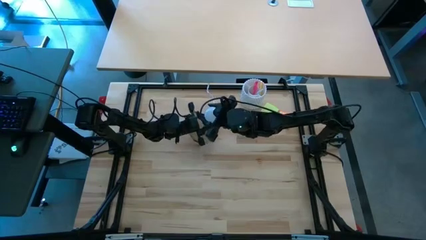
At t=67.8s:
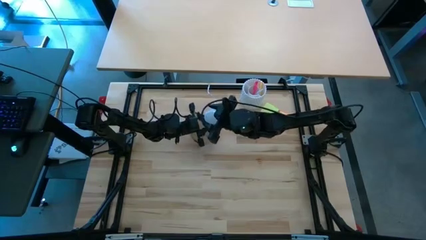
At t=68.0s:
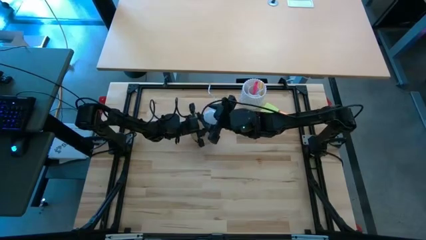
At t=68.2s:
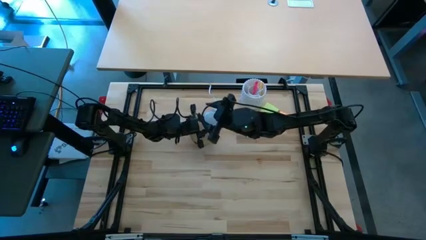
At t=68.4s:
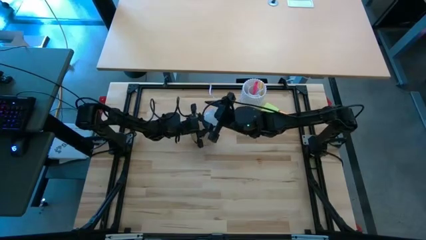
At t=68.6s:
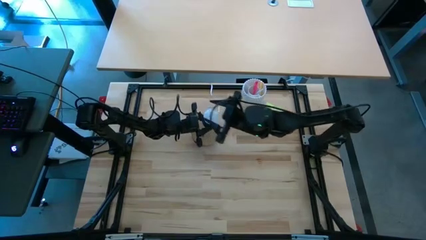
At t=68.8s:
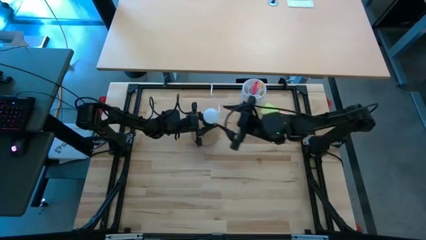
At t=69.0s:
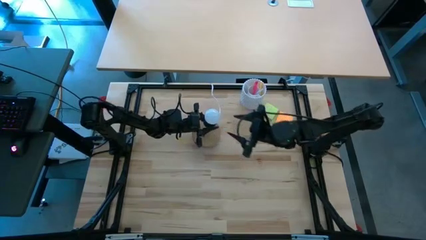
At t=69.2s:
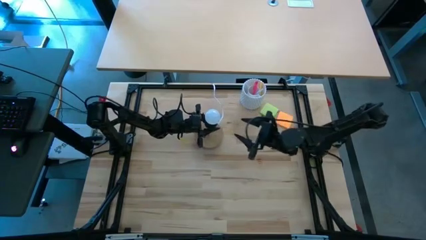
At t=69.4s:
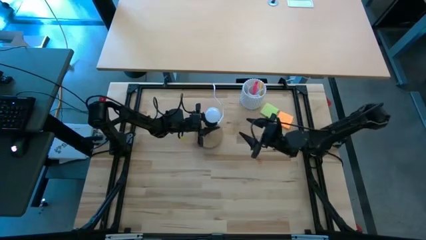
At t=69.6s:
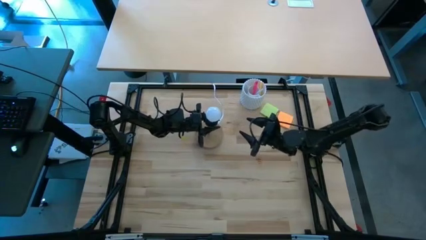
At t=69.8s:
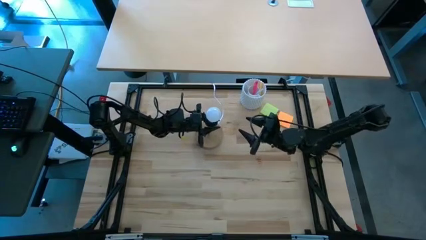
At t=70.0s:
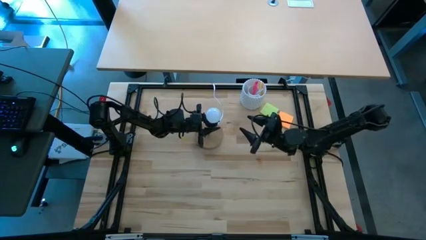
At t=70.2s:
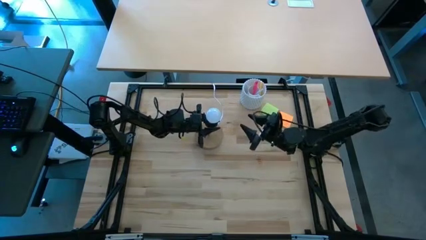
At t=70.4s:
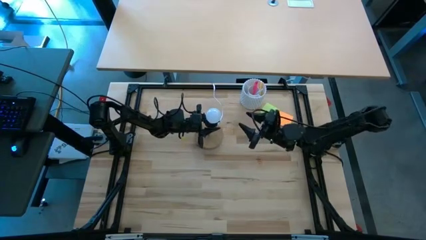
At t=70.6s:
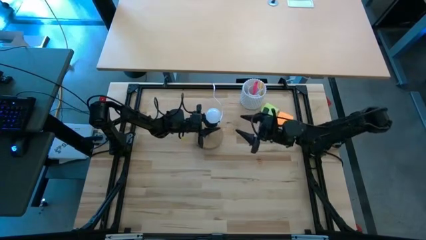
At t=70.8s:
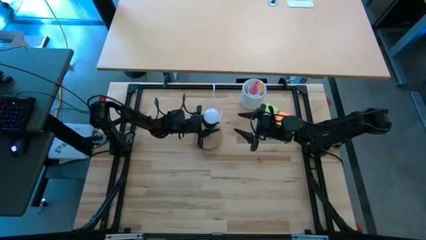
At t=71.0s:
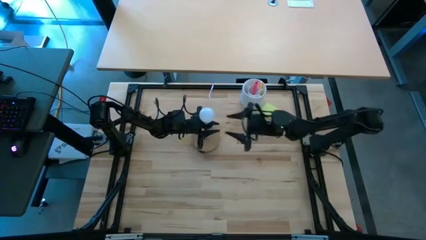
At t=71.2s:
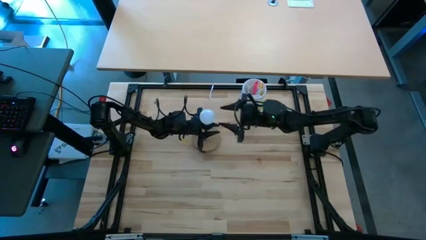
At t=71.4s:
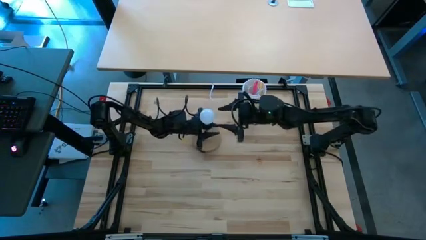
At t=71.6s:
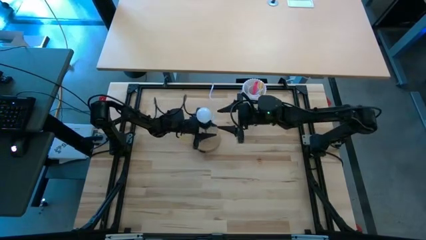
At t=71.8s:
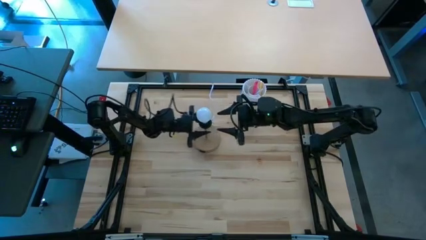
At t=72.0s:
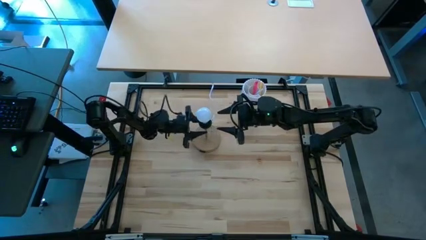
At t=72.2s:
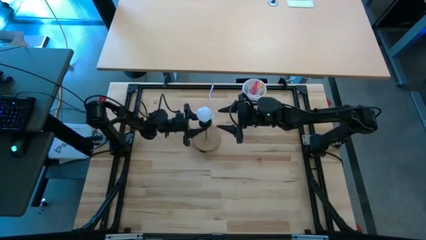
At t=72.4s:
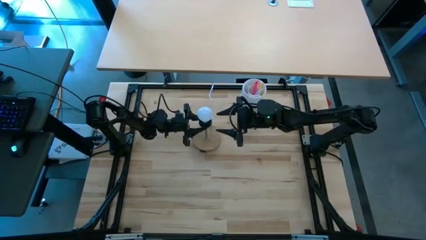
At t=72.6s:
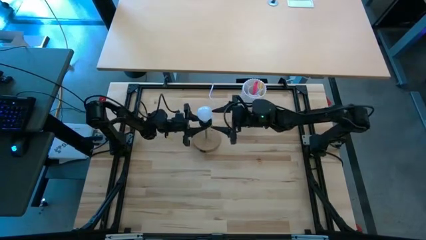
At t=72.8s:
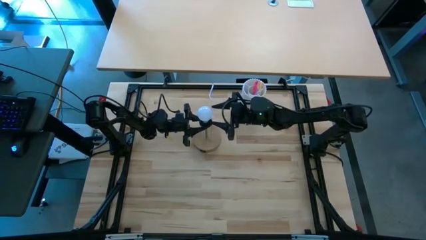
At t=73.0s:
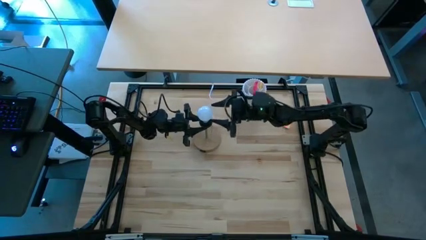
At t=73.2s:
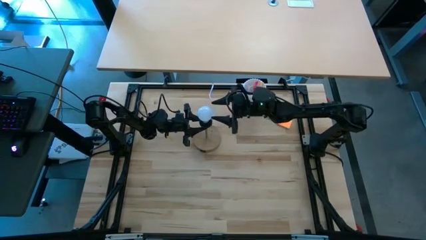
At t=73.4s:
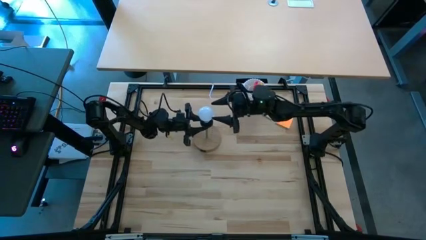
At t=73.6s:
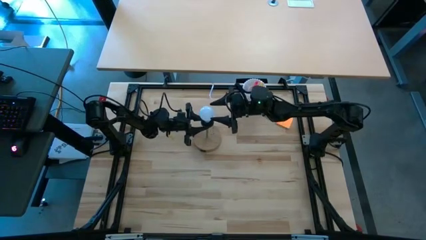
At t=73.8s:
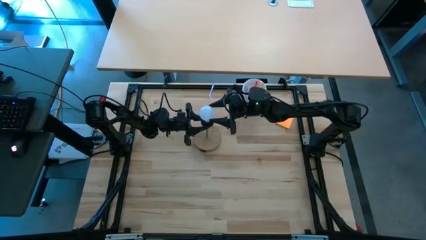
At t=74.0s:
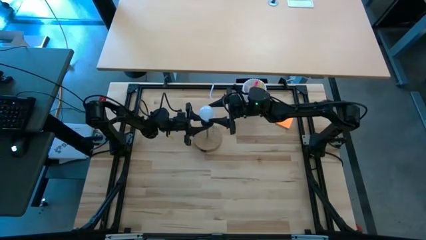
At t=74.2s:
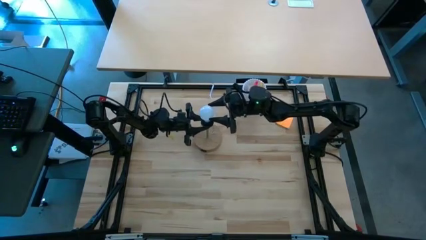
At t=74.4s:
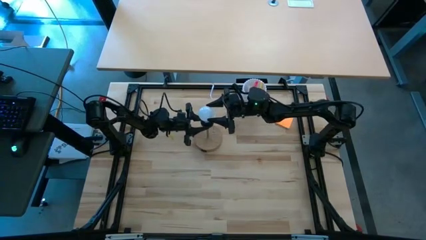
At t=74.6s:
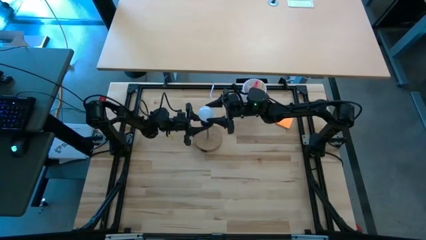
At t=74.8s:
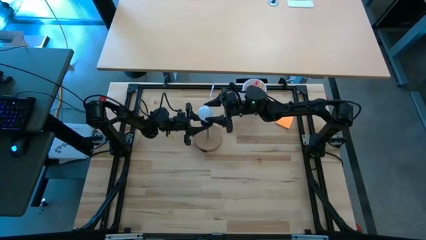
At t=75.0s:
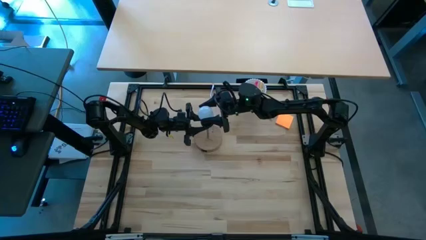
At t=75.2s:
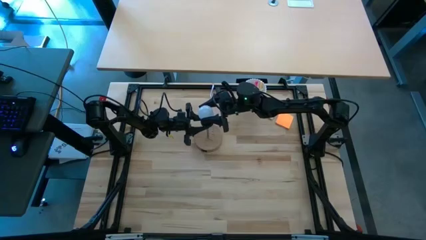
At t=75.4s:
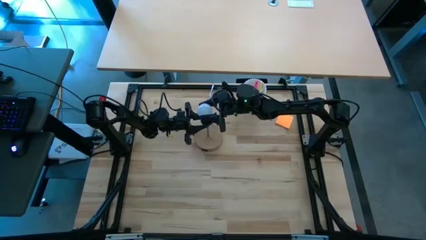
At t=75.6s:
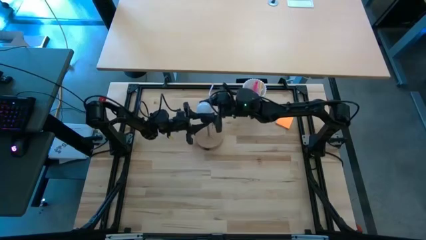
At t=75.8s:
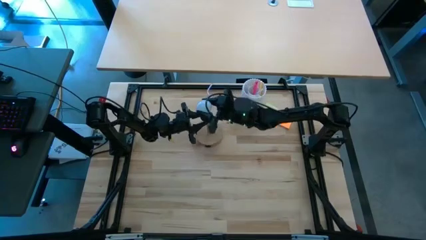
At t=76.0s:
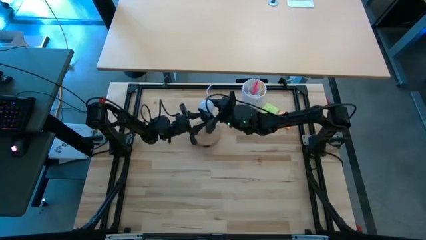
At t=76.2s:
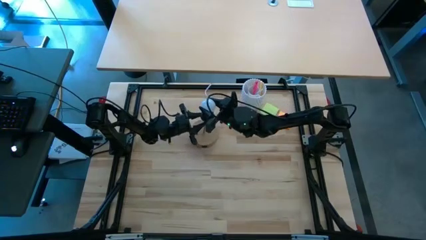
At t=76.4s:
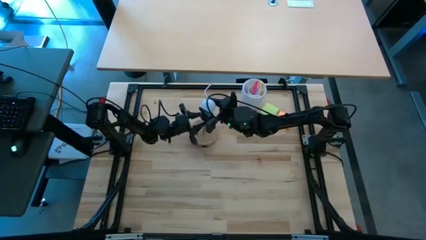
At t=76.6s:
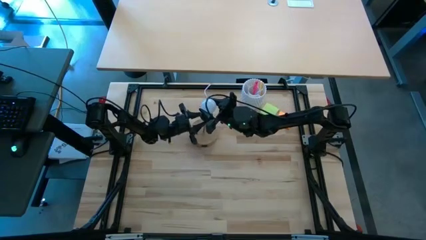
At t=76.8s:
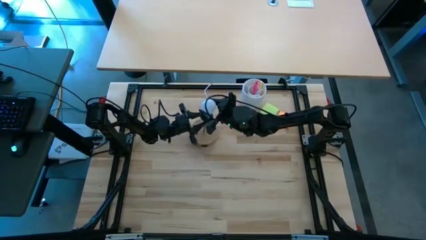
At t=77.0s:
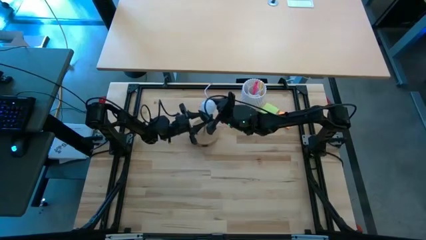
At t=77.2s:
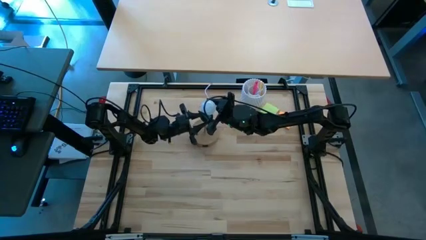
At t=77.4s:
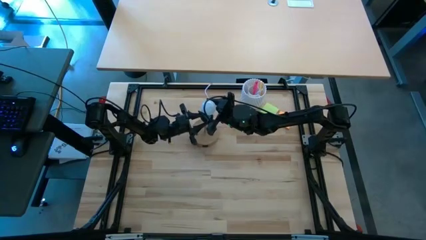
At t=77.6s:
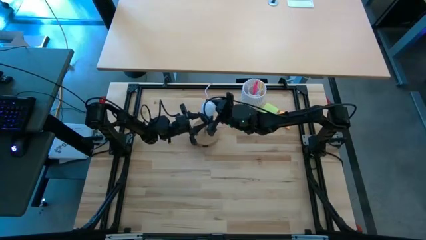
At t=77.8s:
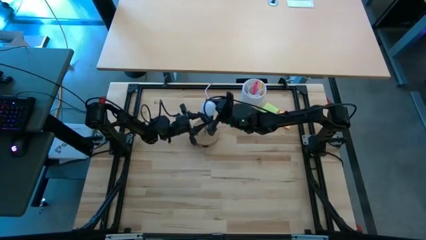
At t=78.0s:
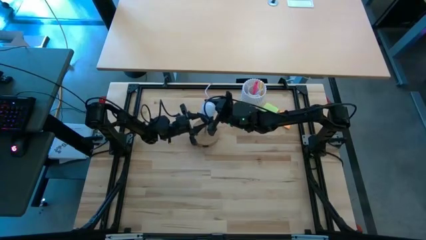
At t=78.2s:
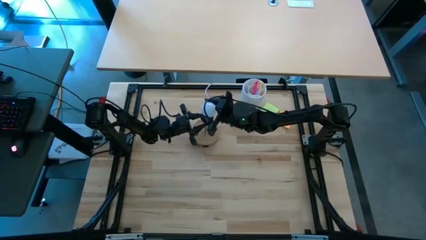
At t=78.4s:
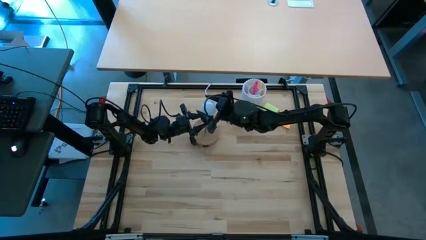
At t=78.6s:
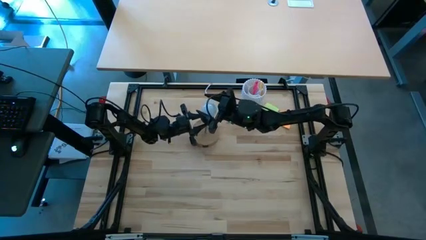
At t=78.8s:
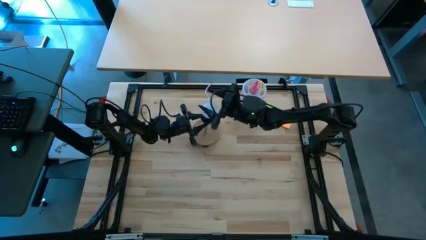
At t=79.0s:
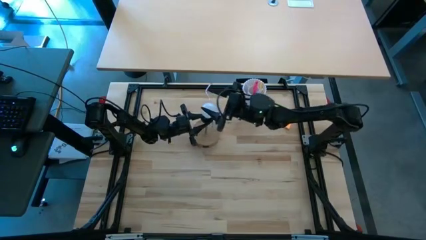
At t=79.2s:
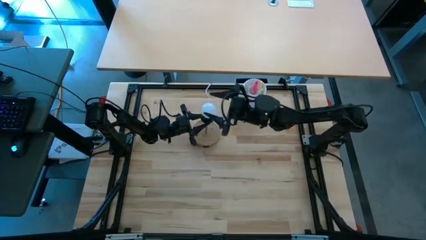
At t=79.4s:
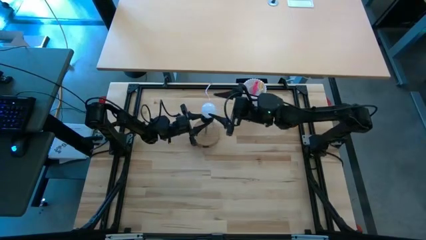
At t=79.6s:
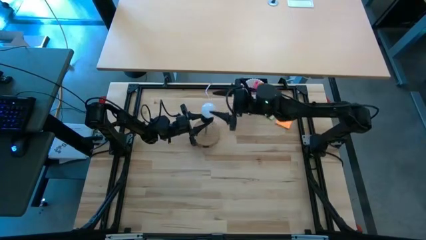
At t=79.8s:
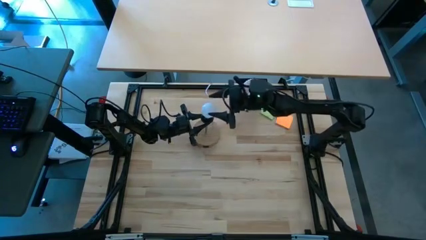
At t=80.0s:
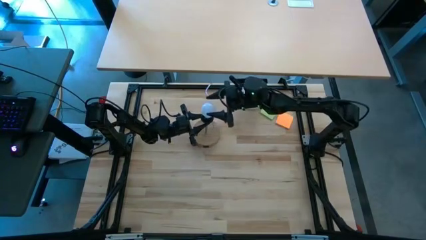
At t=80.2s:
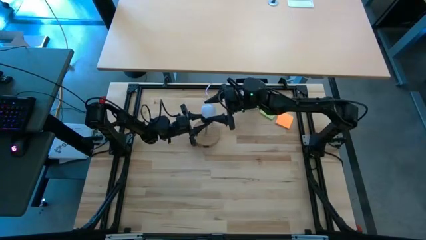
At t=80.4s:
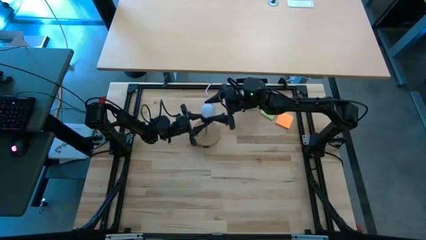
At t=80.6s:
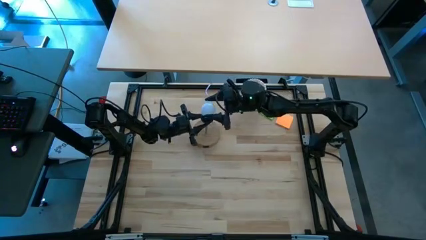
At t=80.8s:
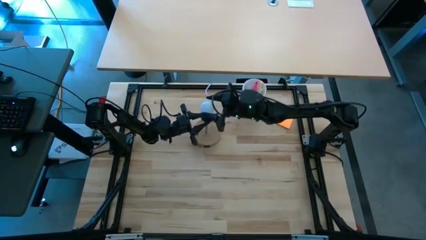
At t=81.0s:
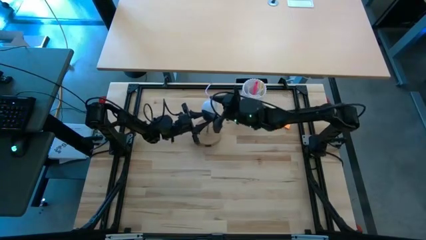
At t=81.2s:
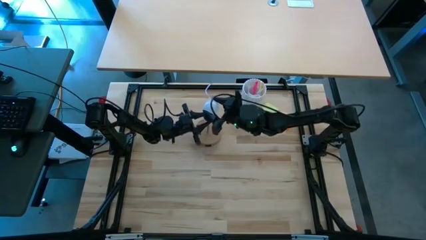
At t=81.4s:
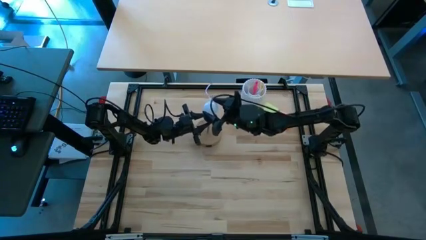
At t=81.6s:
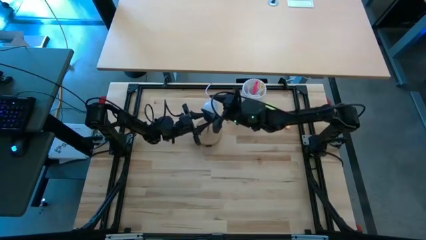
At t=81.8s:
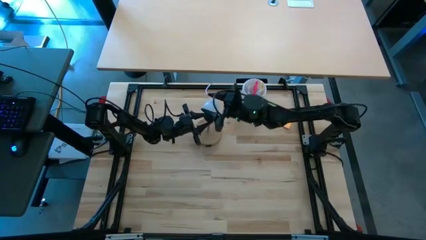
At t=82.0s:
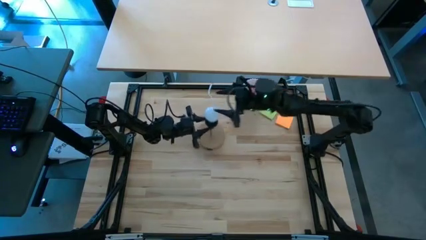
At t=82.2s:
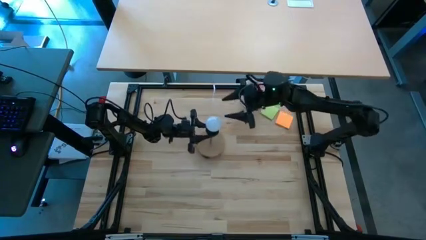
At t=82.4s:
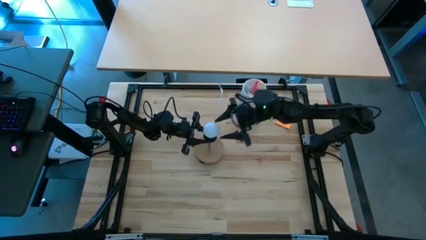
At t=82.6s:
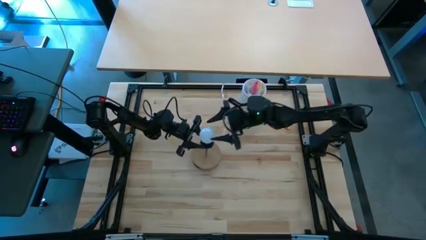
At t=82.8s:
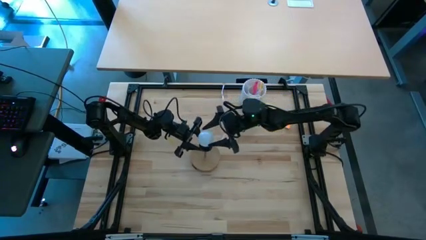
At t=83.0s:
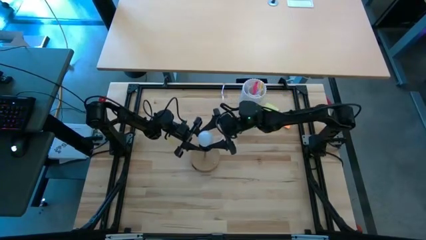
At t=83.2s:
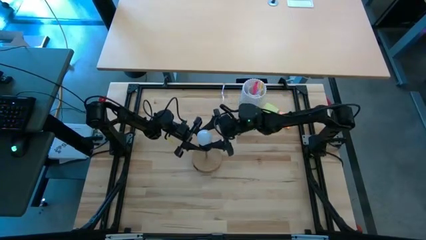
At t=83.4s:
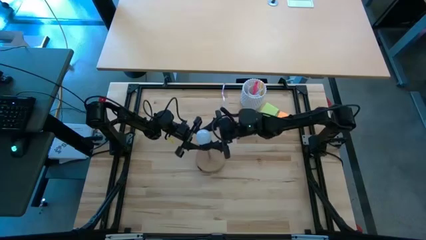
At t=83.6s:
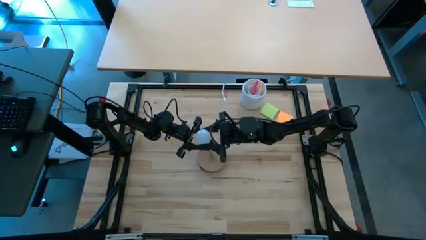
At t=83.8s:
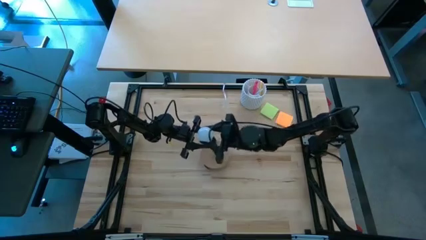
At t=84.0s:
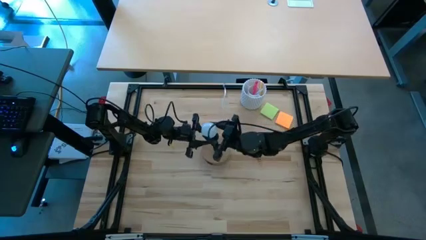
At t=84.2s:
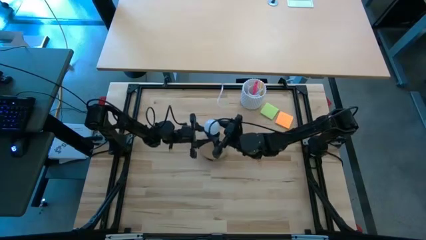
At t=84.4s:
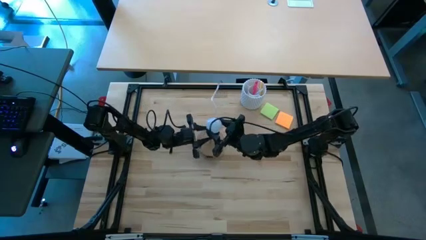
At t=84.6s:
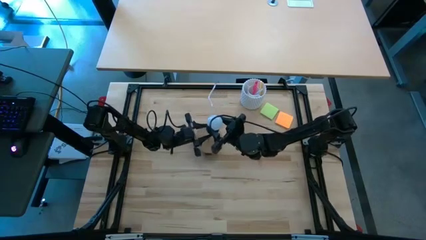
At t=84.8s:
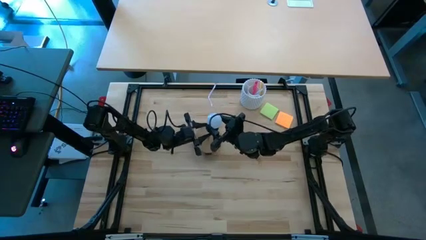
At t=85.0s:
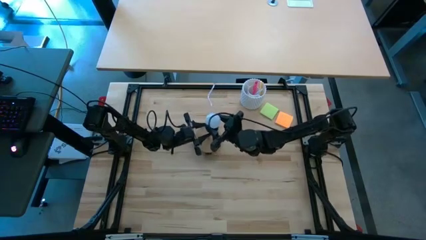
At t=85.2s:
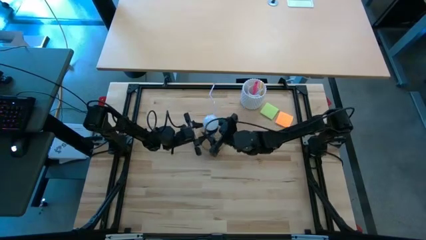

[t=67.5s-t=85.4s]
Task: Screw lightbulb
Insert the light bulb into the lamp
